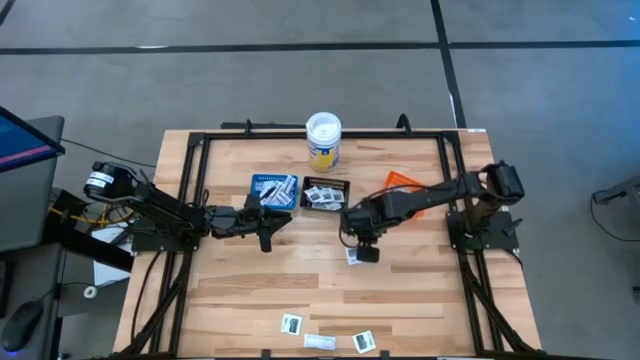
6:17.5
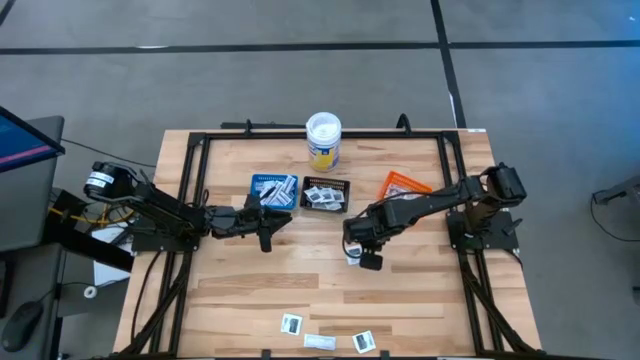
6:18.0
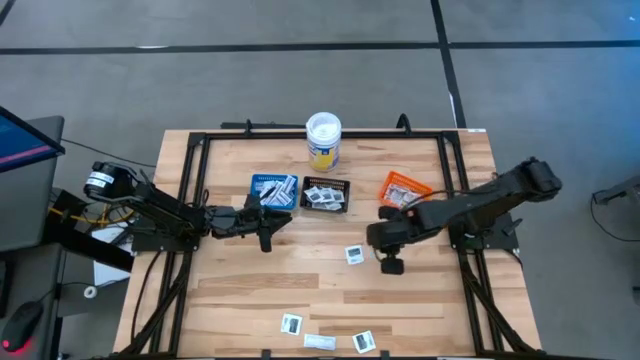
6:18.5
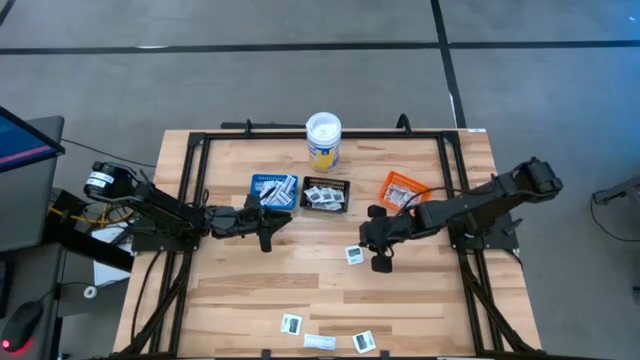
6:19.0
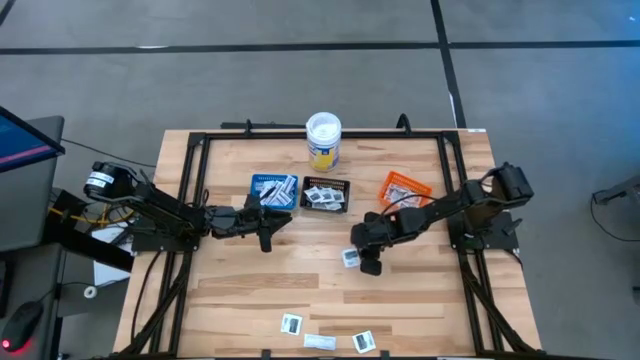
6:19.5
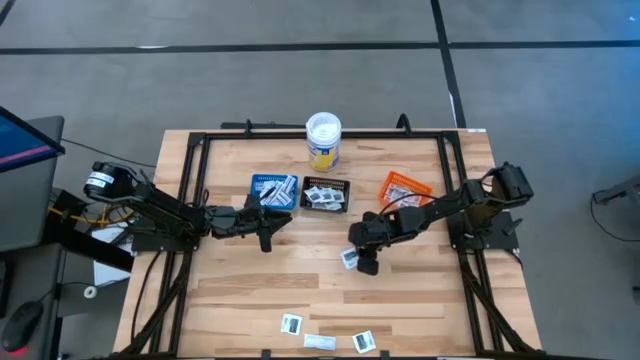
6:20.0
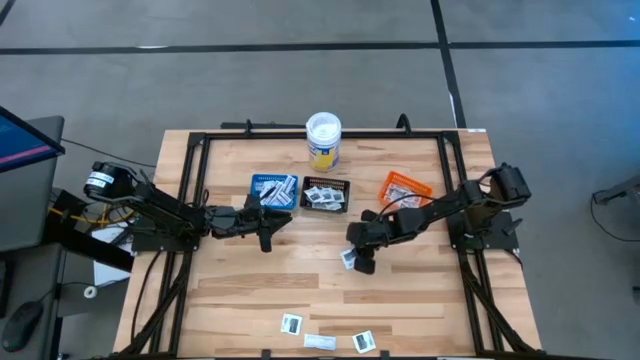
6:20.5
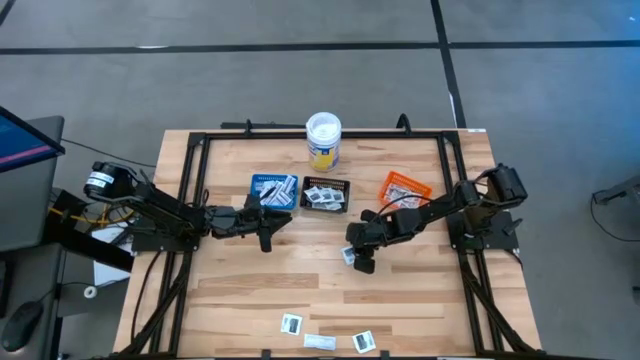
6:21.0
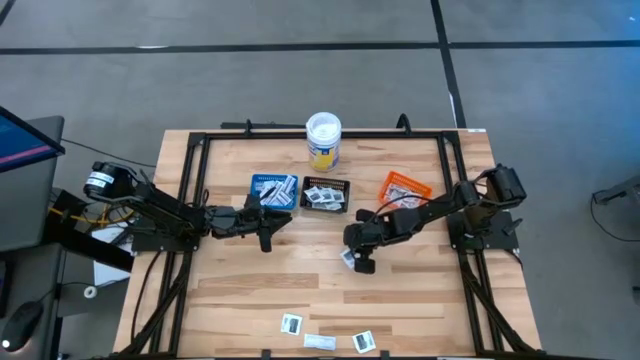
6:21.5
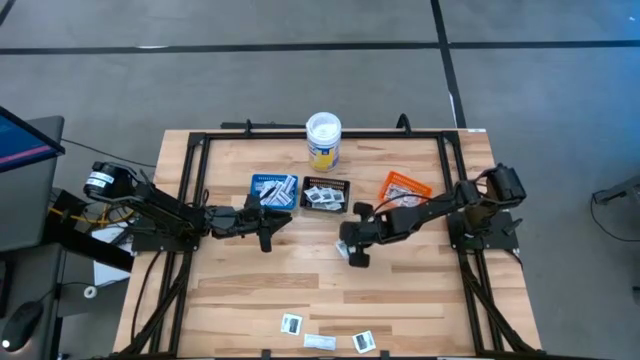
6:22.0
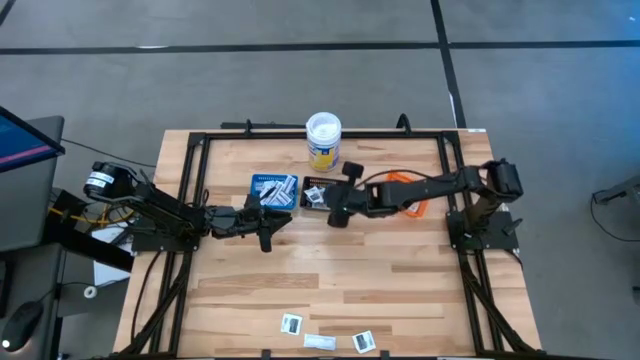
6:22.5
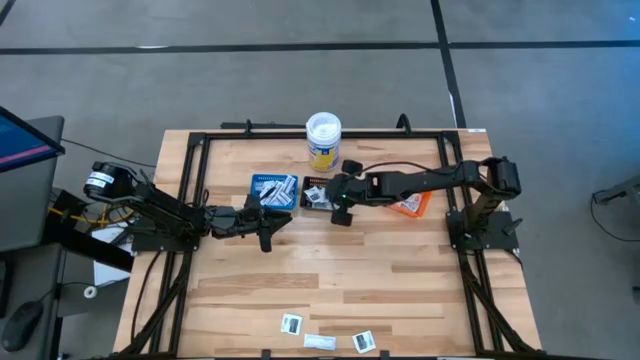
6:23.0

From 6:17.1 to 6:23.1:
Task: Pick & Place First Aid Supplies
Put the black towelette pack into the black bin

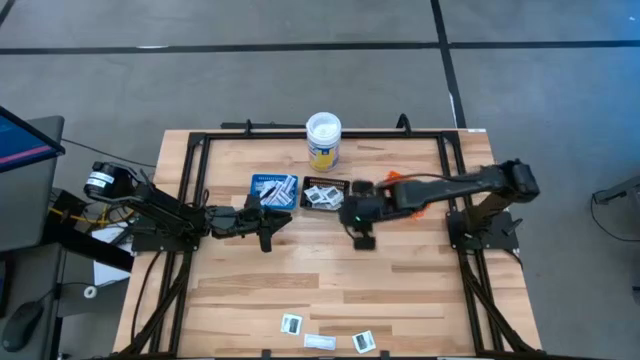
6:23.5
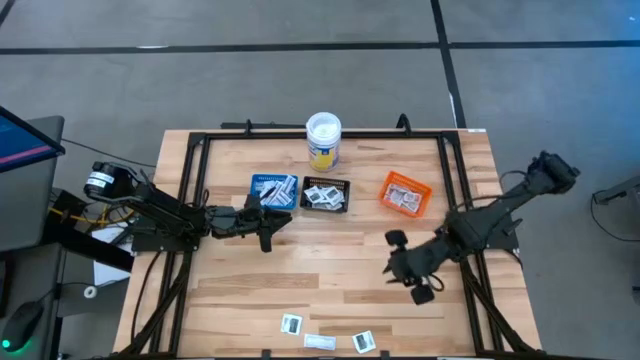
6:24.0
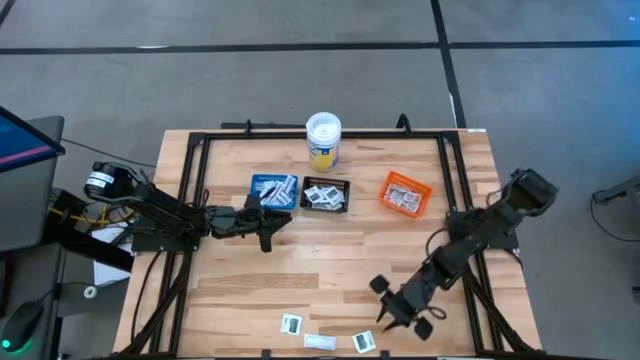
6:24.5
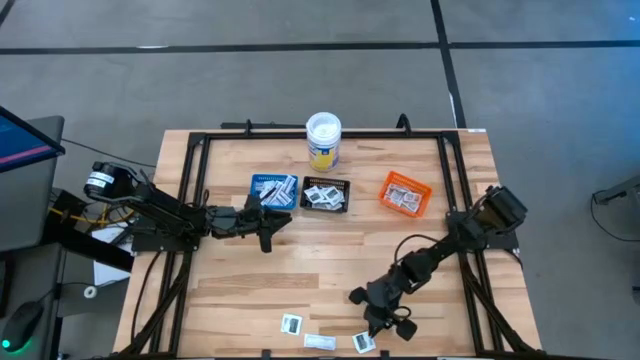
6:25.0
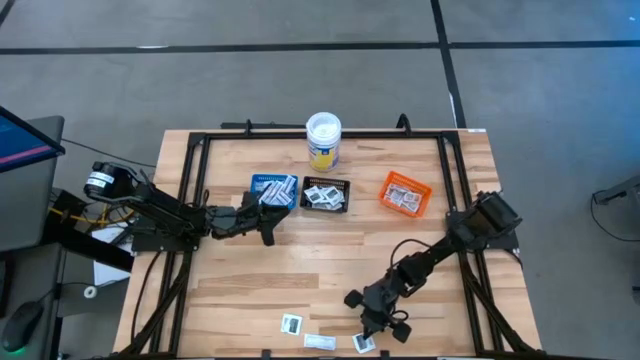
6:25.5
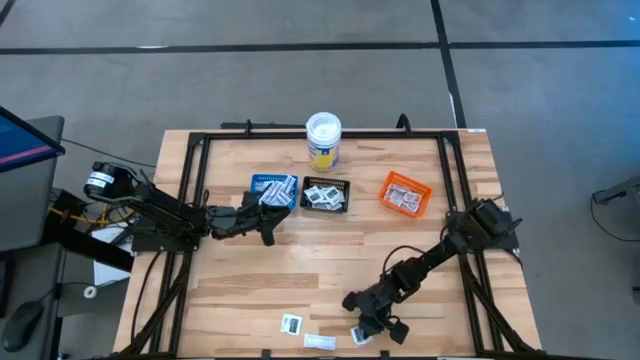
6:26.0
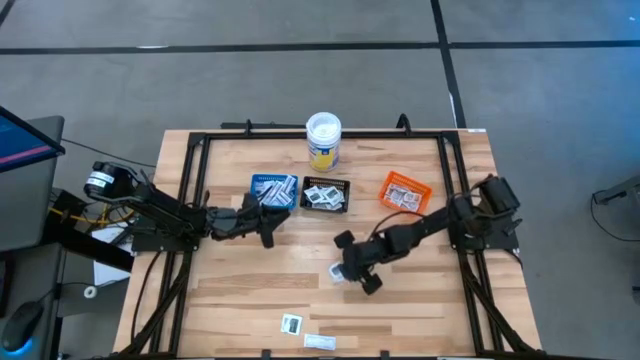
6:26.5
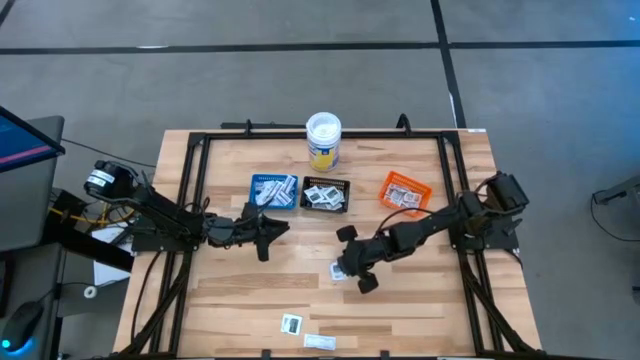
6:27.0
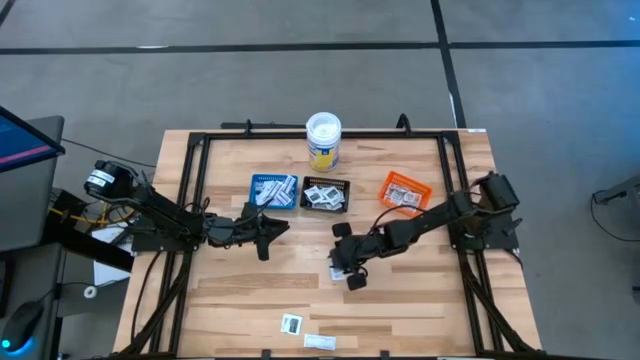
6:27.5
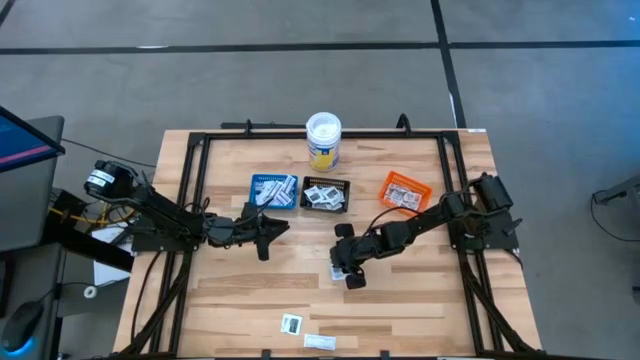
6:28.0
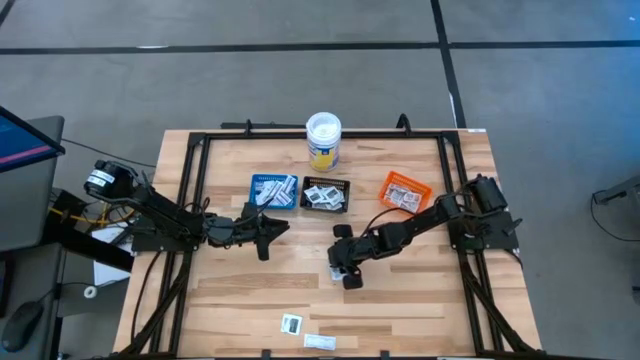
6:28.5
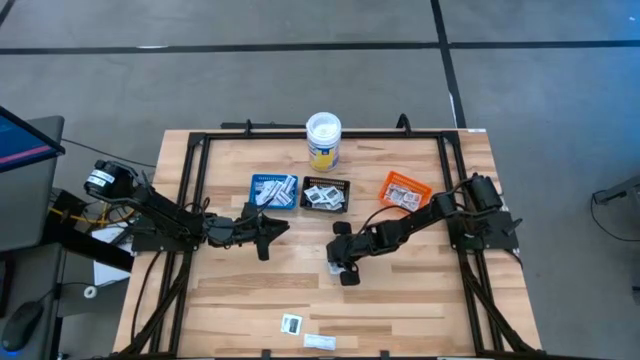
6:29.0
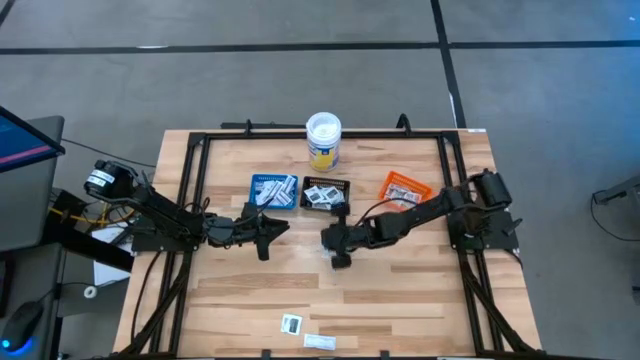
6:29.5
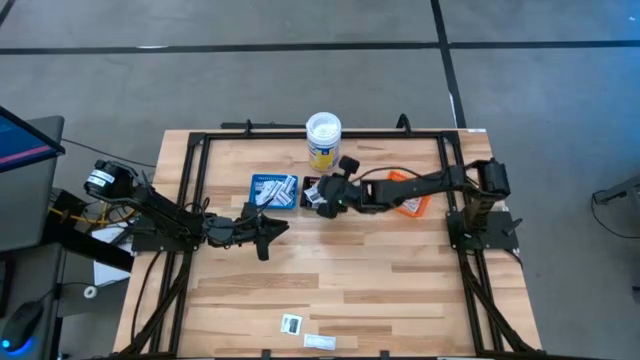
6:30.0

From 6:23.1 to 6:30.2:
Put the black towelette pack into the black bin

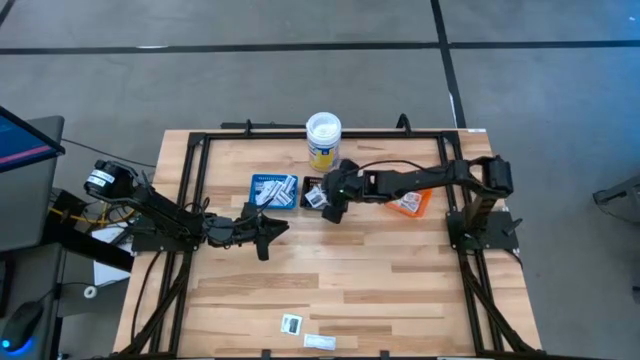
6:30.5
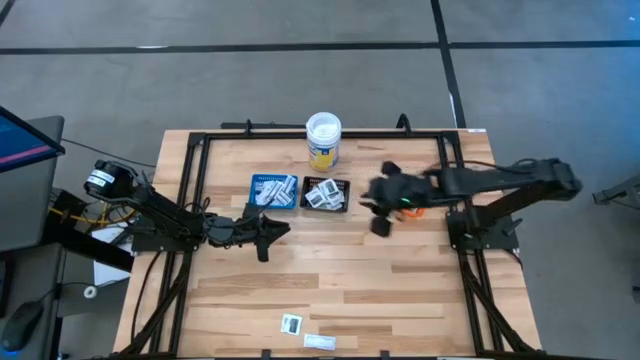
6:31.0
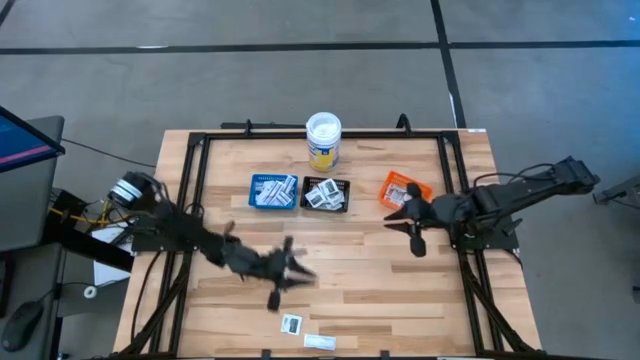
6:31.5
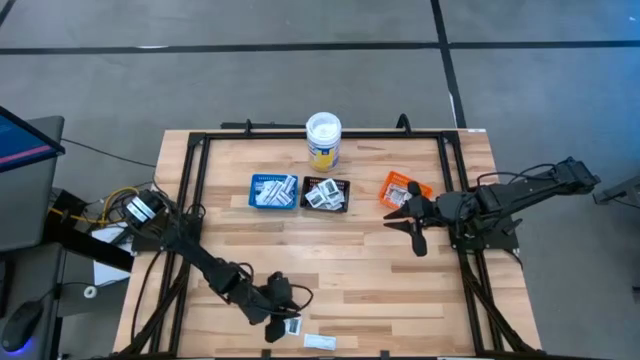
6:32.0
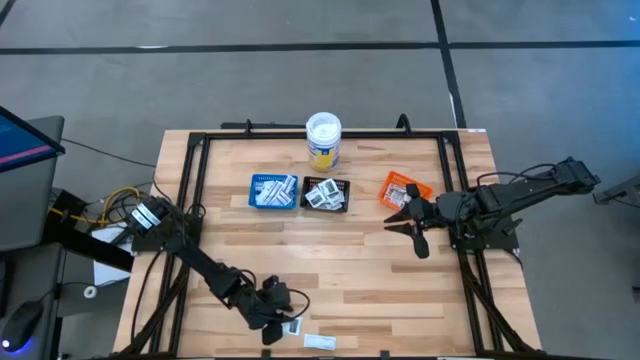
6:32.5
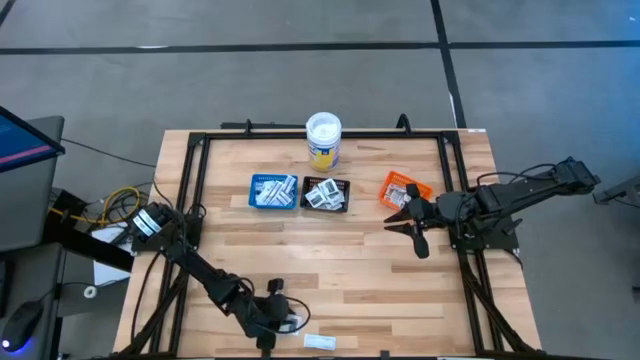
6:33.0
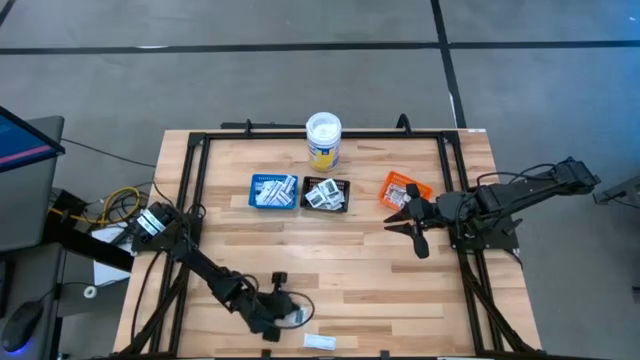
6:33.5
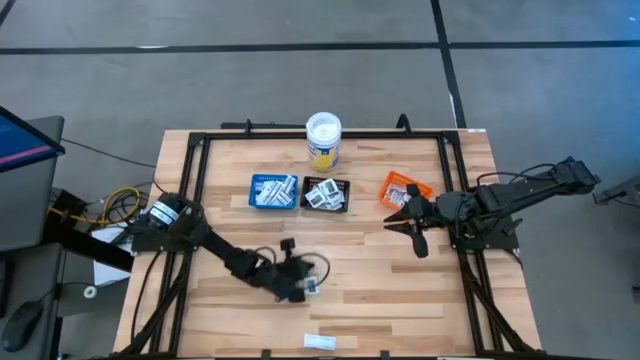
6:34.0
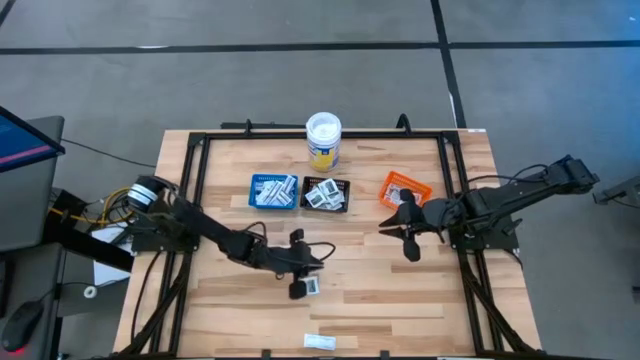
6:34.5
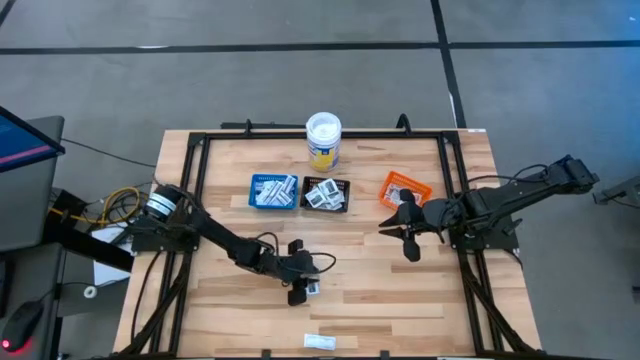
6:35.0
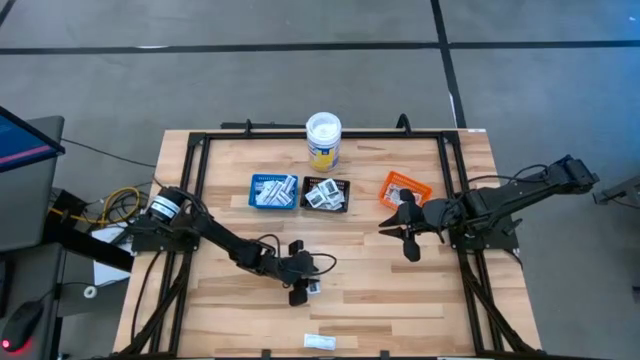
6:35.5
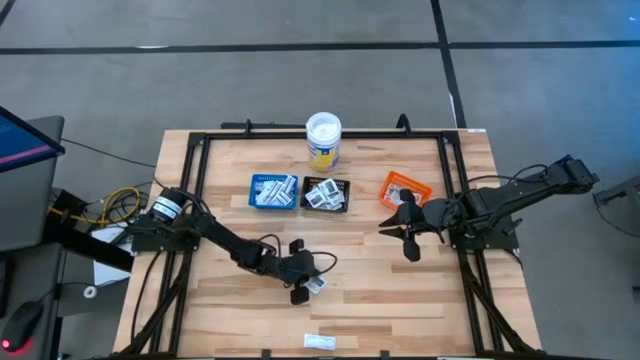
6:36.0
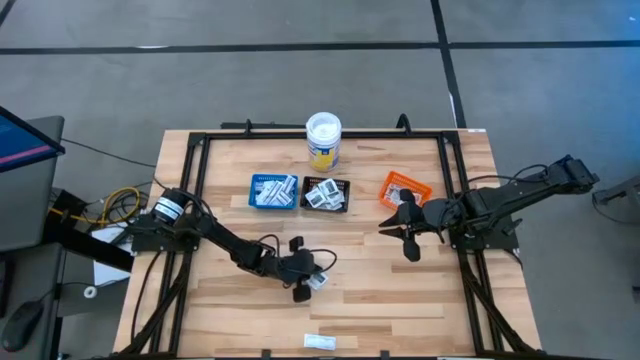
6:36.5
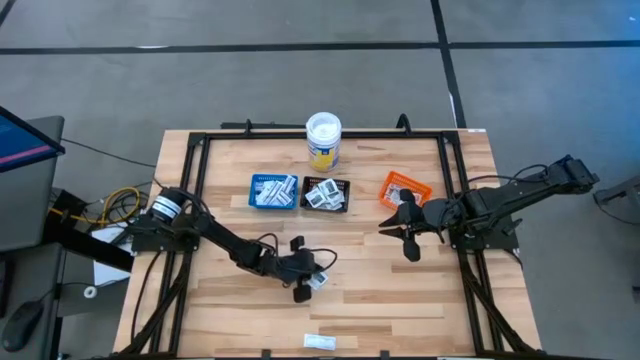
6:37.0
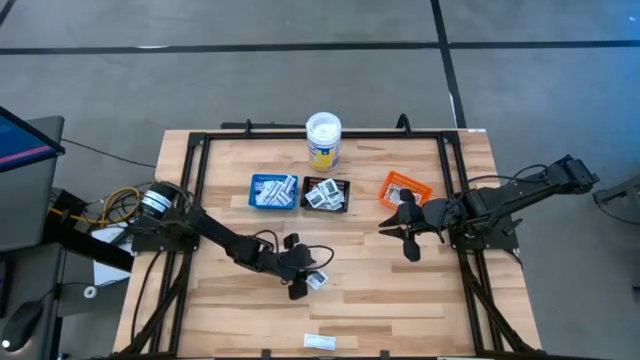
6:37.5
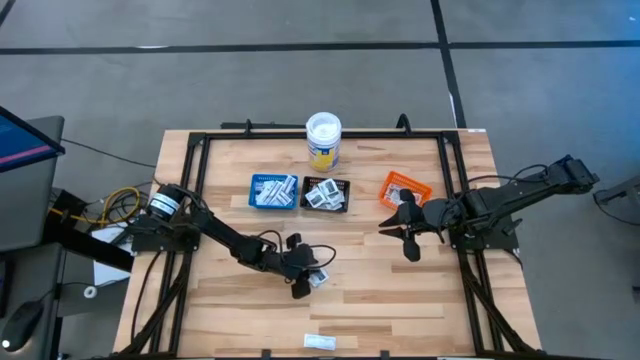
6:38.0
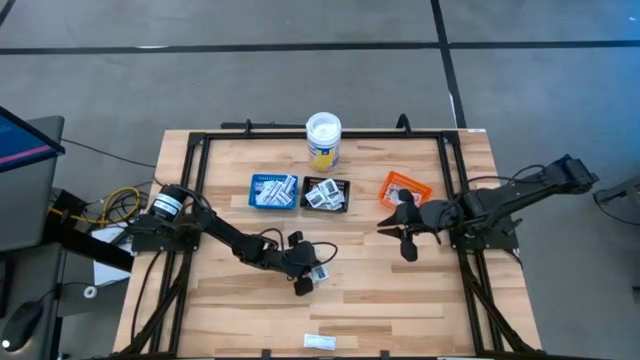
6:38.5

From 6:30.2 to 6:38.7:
Put the black towelette pack into the black bin

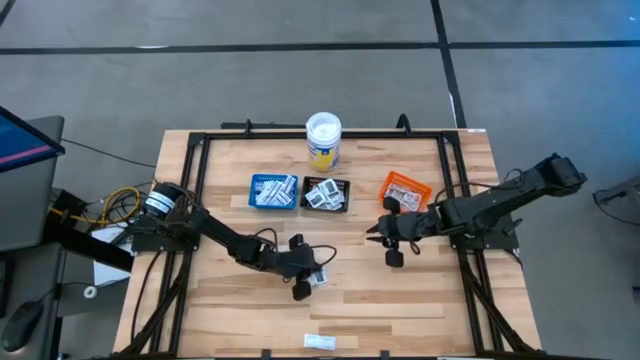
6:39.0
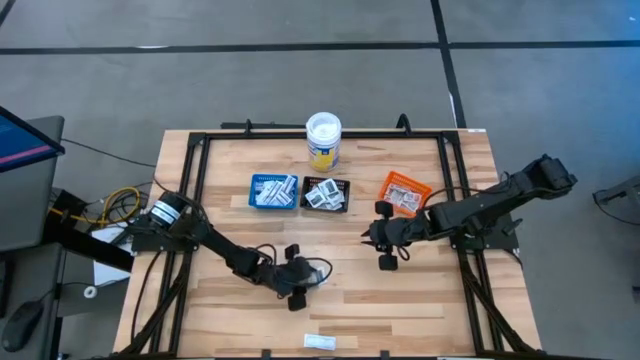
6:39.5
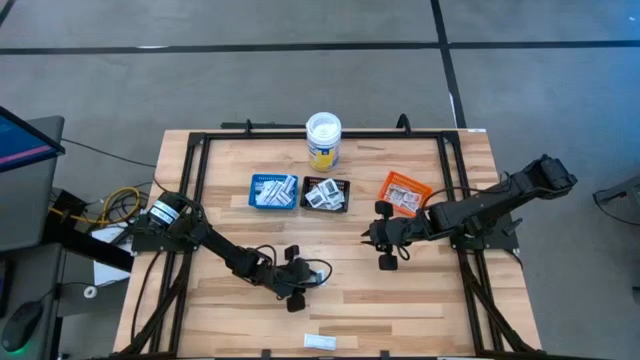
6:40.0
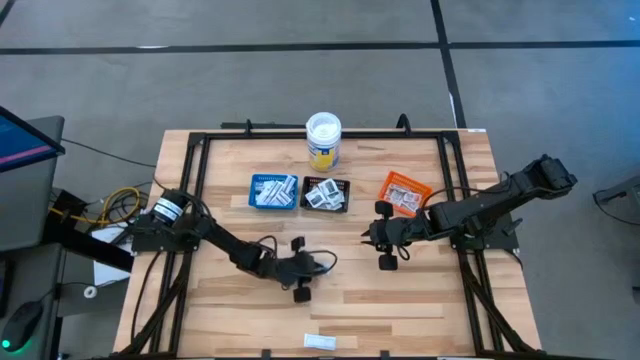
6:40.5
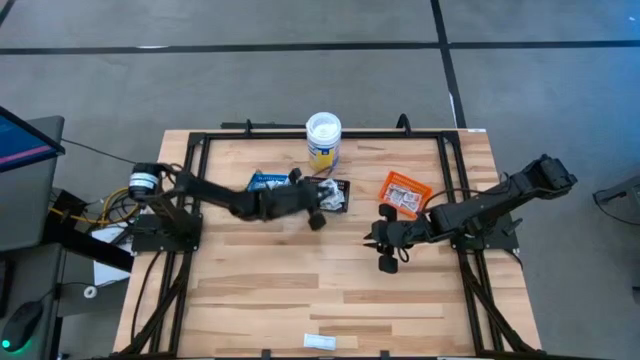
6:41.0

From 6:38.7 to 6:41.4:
Put the black towelette pack into the black bin
